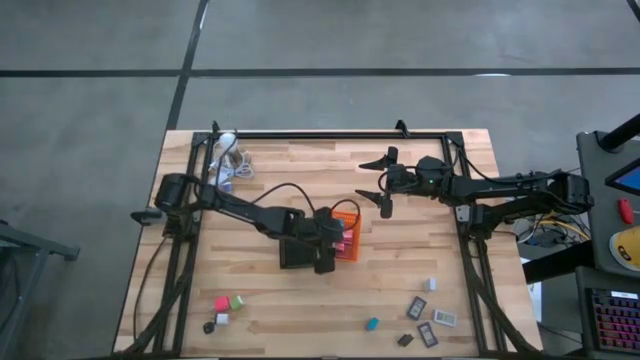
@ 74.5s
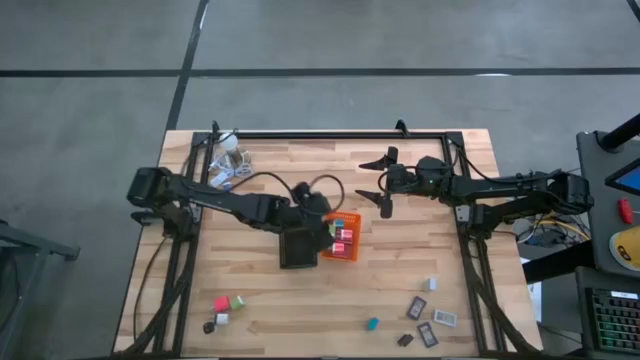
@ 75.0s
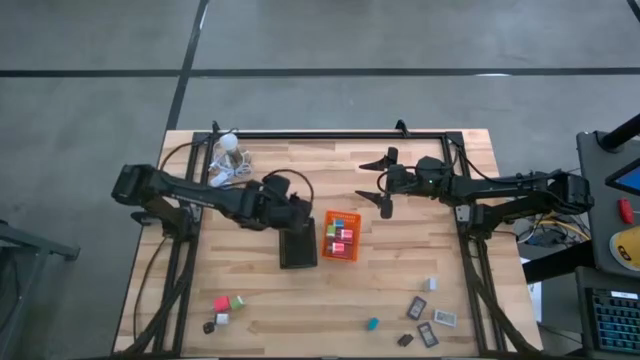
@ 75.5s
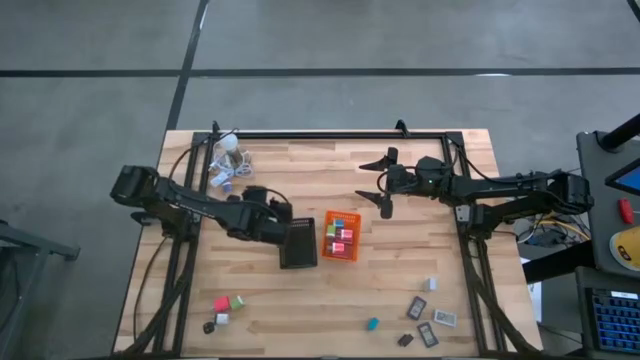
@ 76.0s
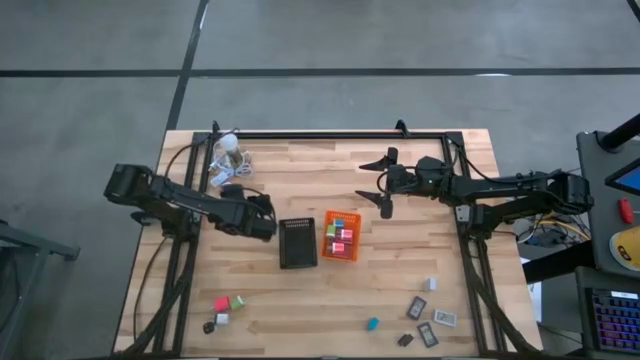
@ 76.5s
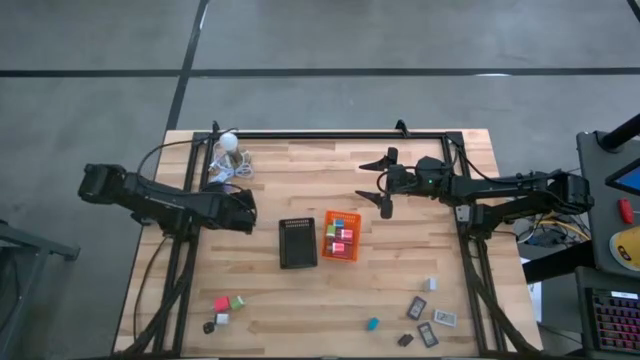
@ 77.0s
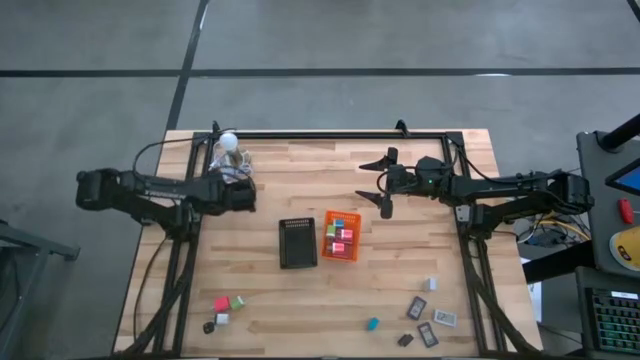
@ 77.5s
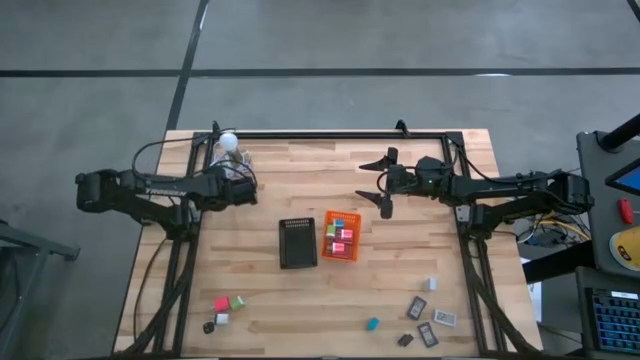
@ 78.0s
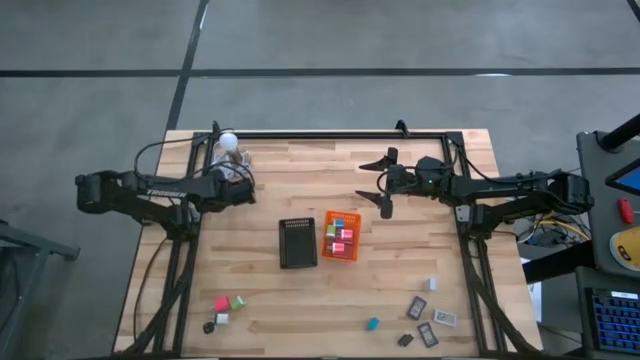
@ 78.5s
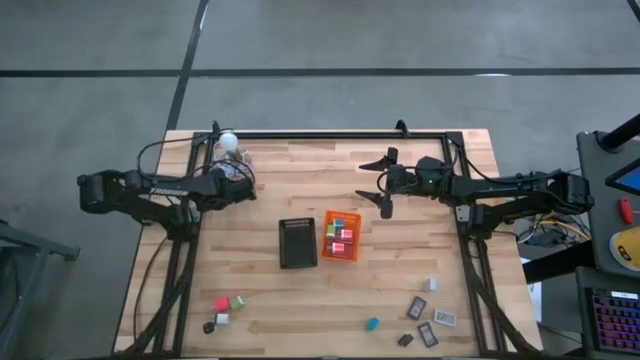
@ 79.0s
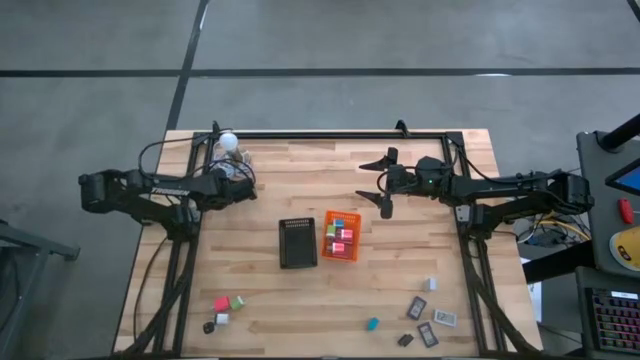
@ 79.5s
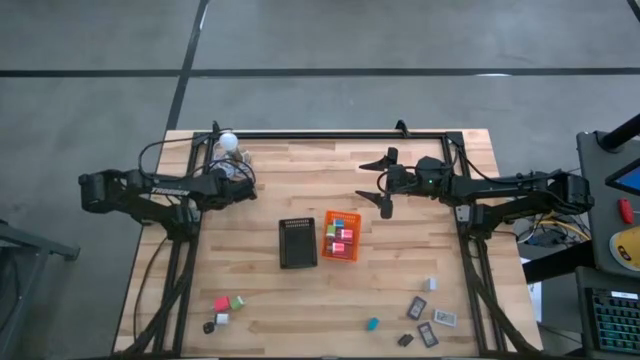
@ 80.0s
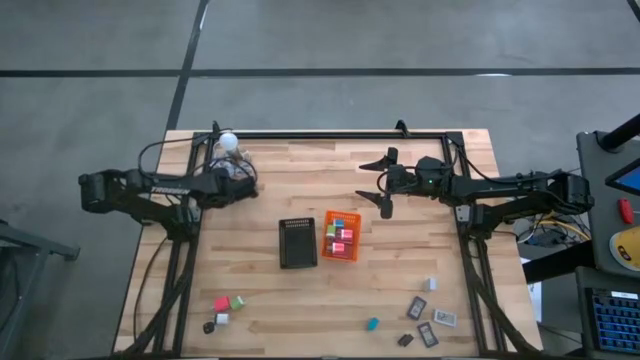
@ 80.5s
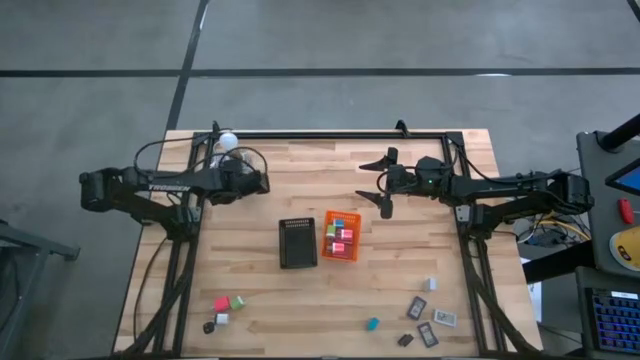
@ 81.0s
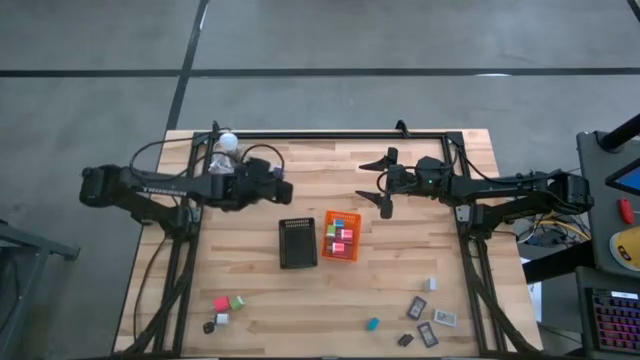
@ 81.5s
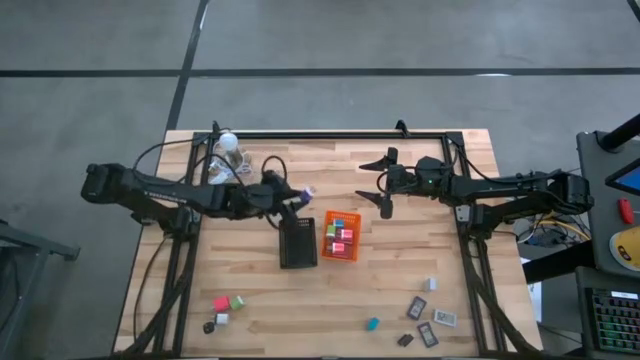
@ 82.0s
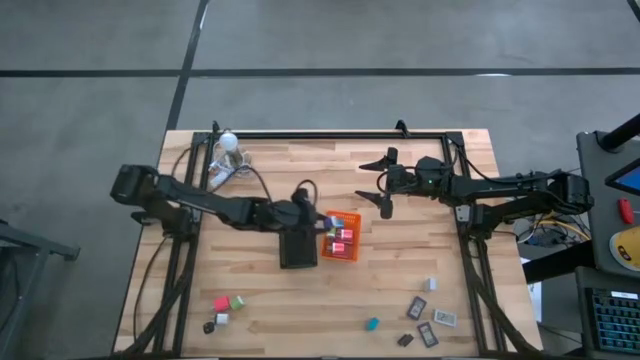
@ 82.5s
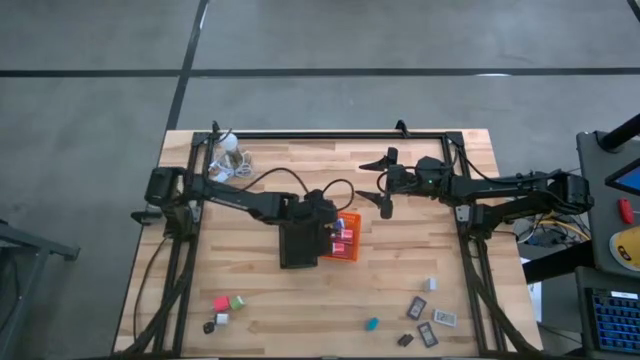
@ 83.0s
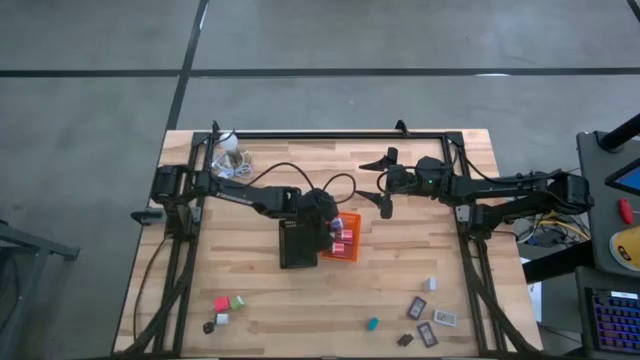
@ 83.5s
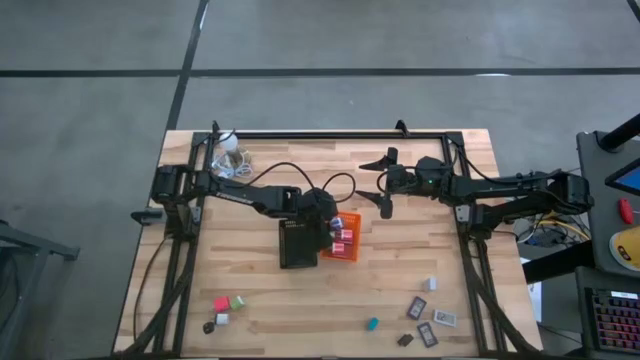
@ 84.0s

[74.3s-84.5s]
Task: Pick & Place Office items
Put the violet charger adapter into the orange bin

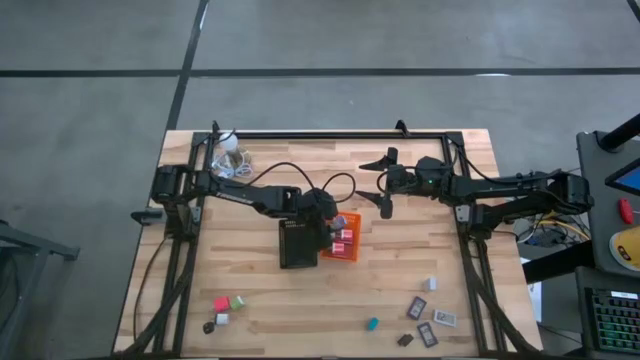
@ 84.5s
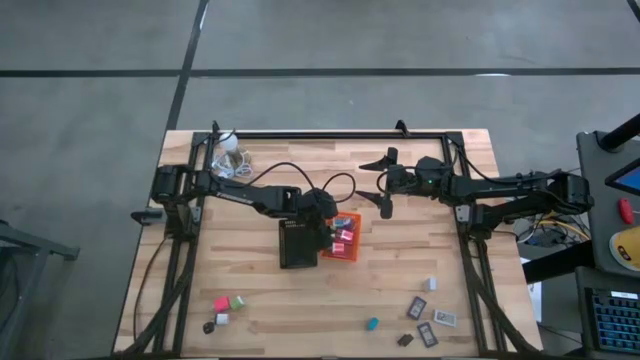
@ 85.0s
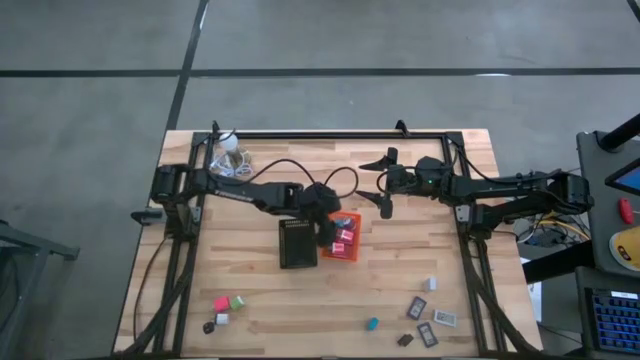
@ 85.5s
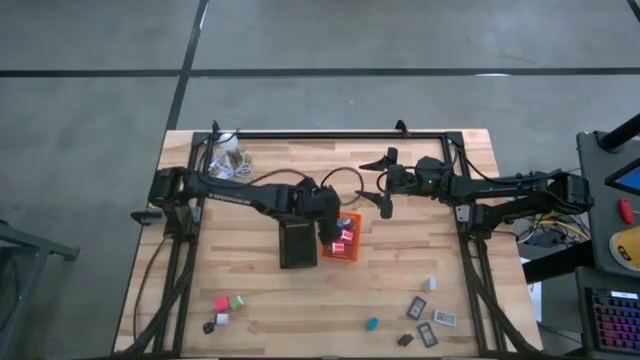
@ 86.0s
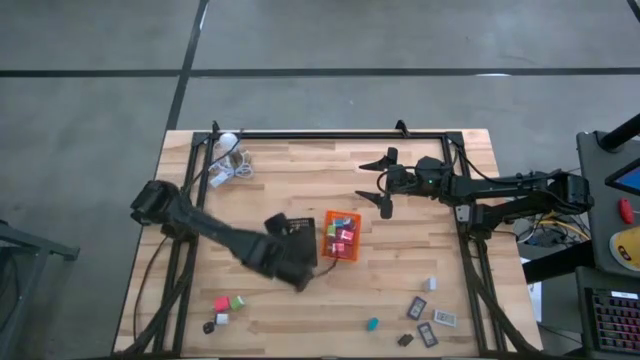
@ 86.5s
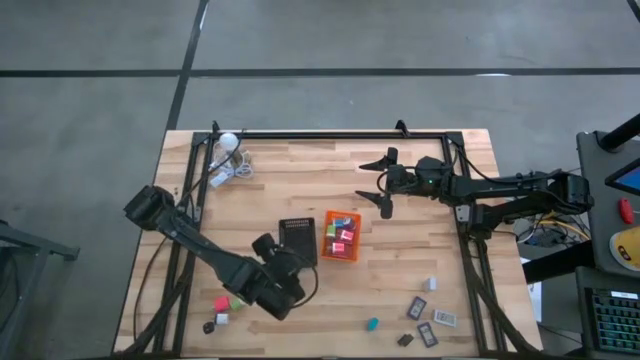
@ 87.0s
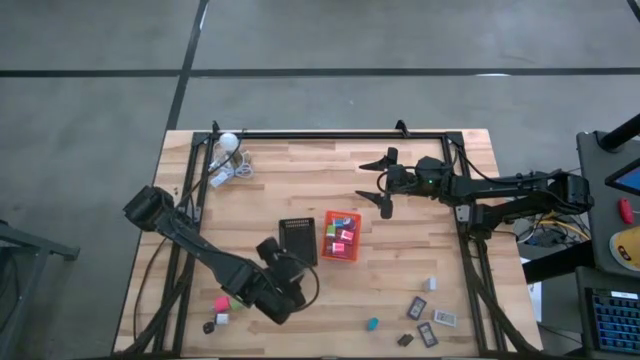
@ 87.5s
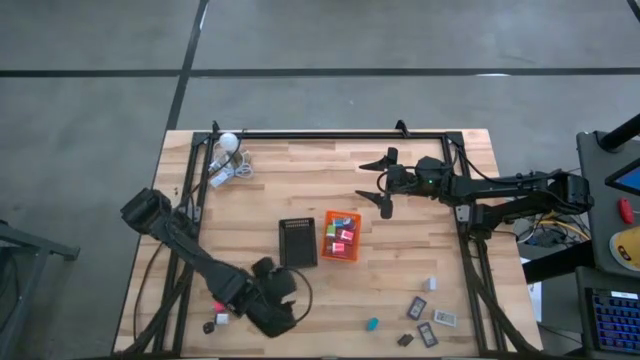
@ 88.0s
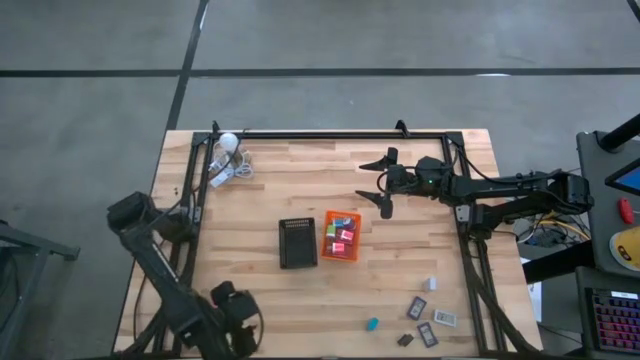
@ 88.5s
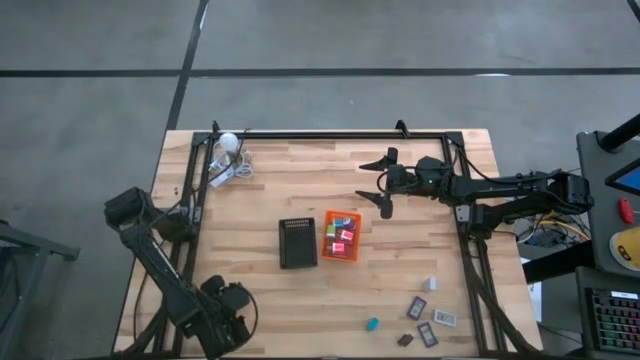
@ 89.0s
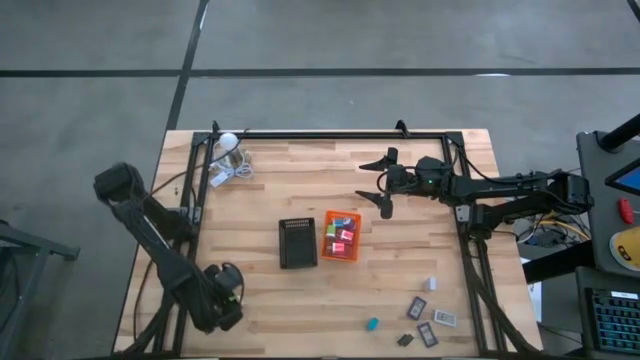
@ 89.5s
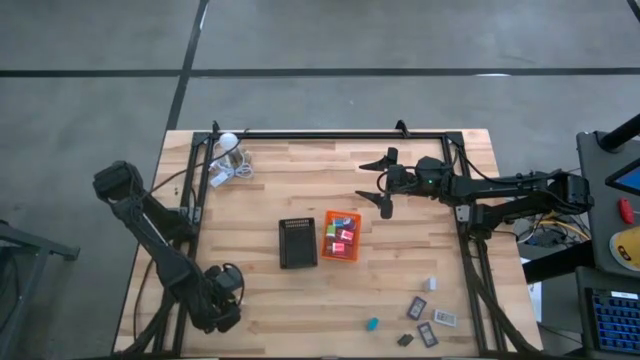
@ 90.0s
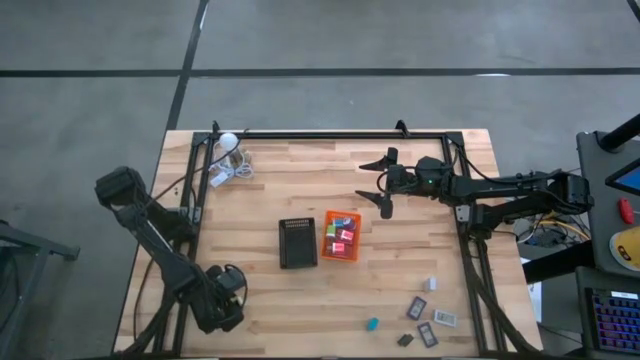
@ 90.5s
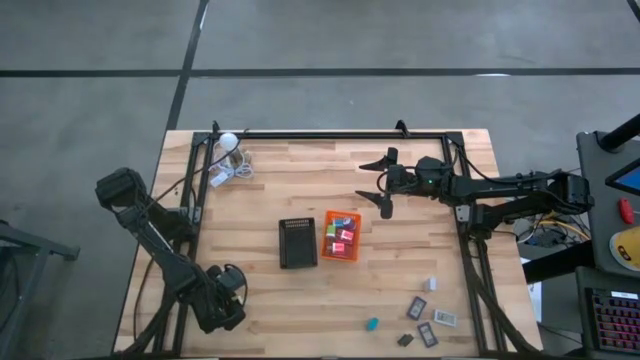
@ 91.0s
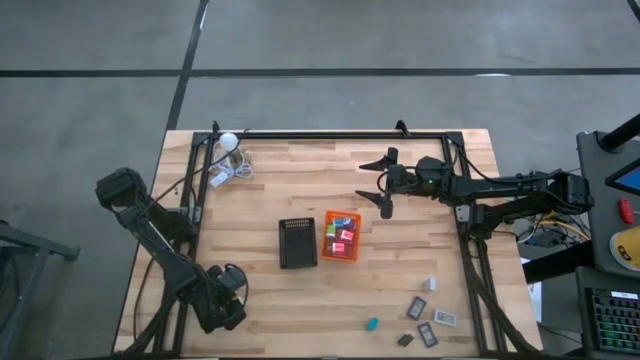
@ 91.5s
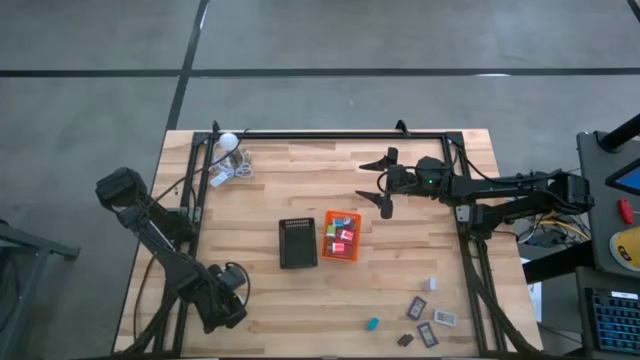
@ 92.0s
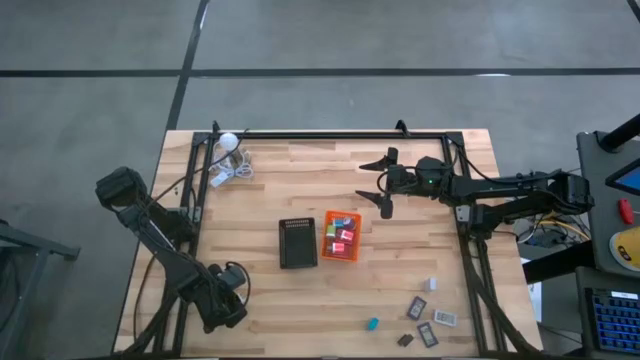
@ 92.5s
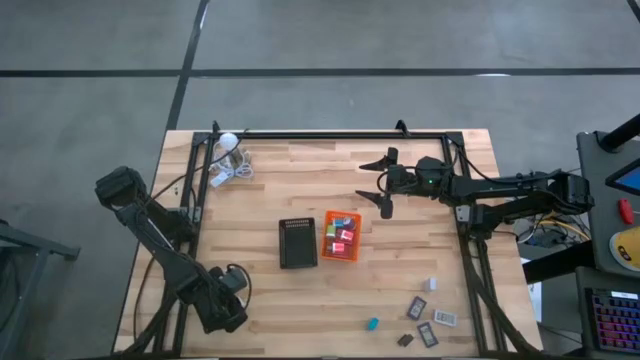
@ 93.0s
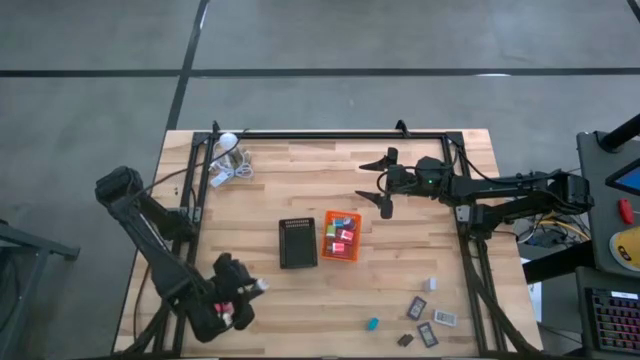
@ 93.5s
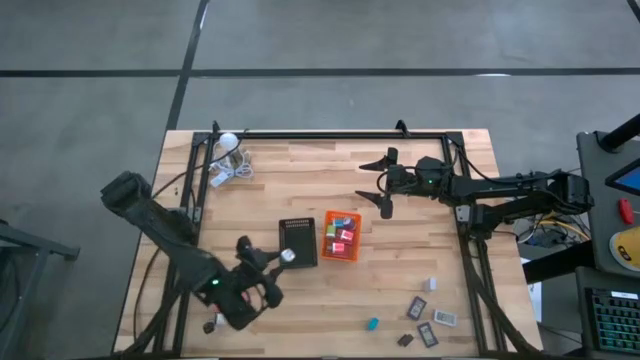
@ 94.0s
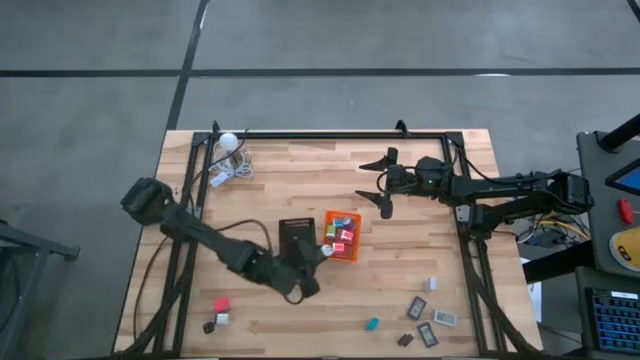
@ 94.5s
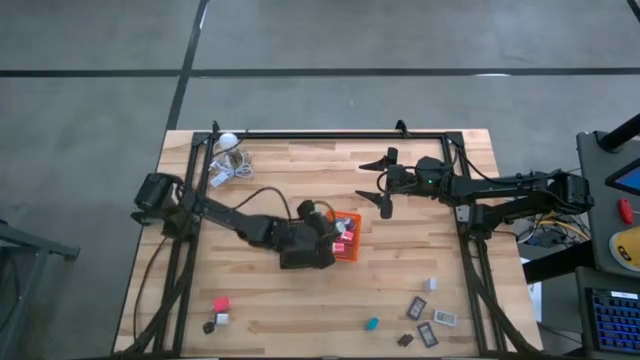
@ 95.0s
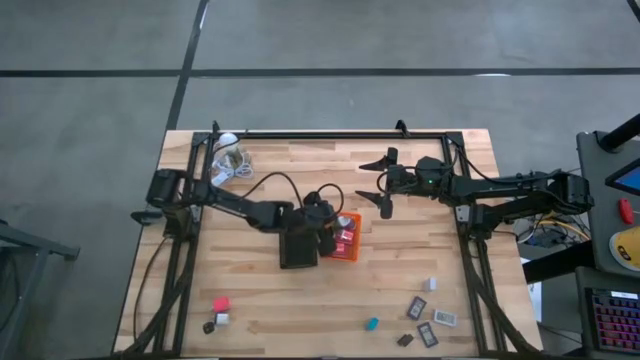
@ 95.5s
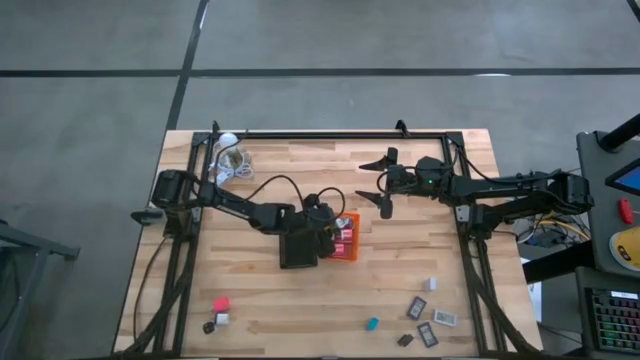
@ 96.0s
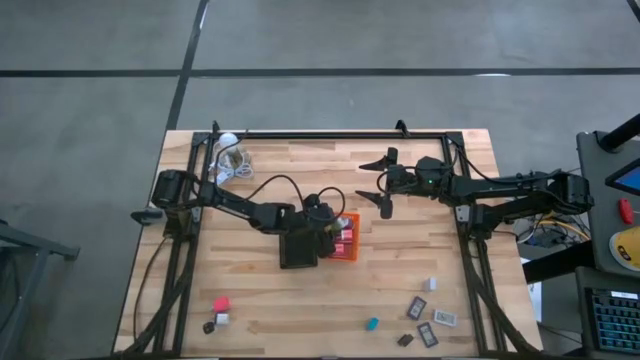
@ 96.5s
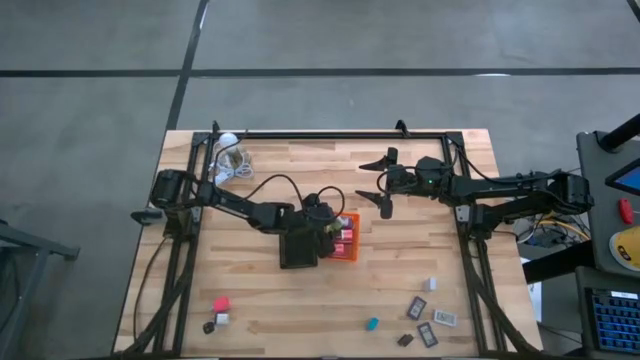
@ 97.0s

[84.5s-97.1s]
Put the green charger adapter into the orange bin
